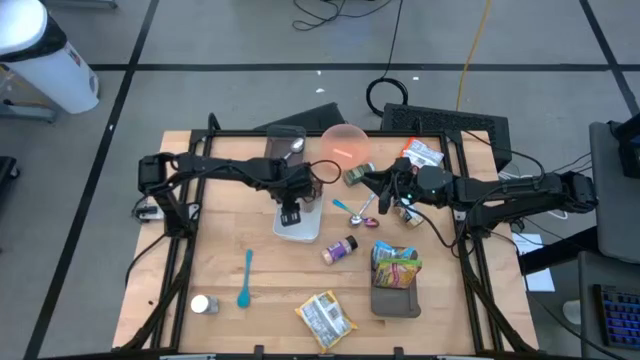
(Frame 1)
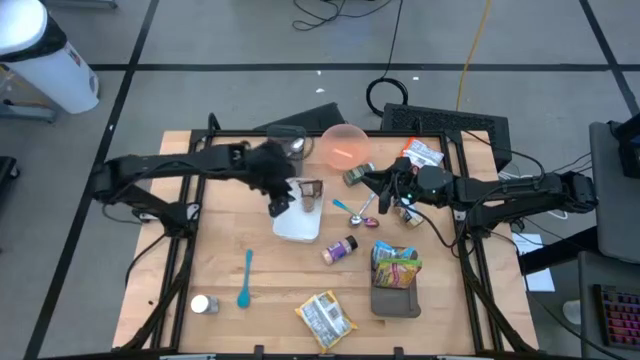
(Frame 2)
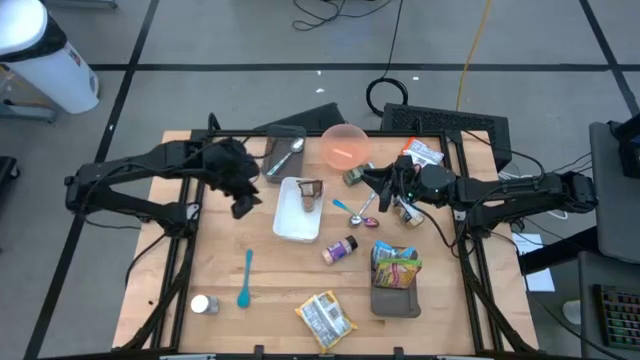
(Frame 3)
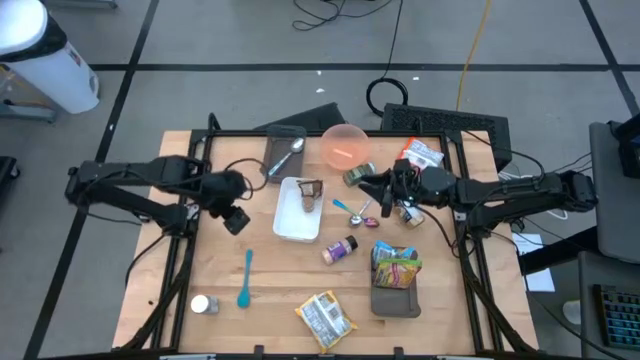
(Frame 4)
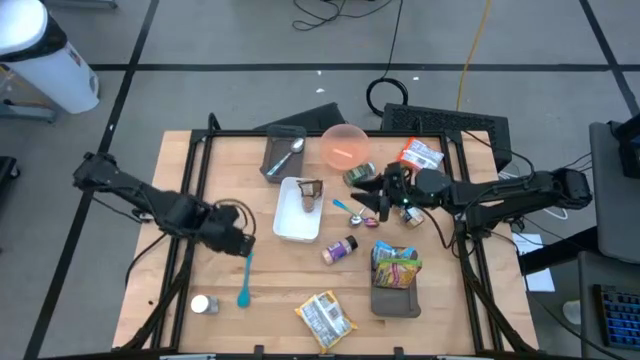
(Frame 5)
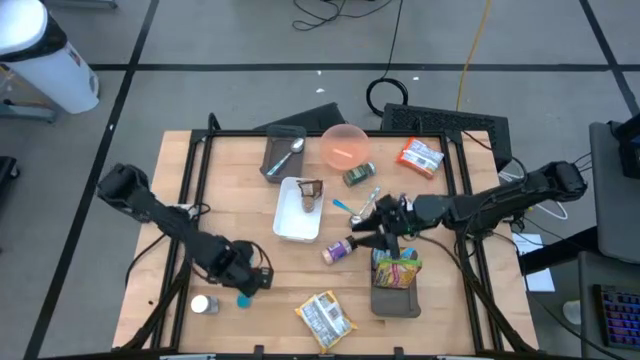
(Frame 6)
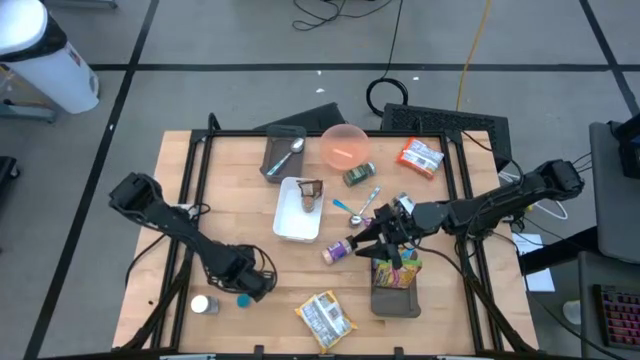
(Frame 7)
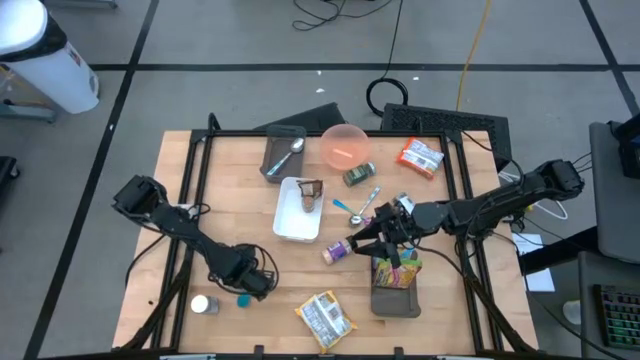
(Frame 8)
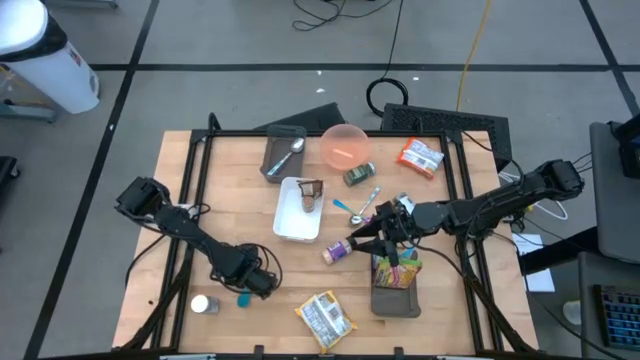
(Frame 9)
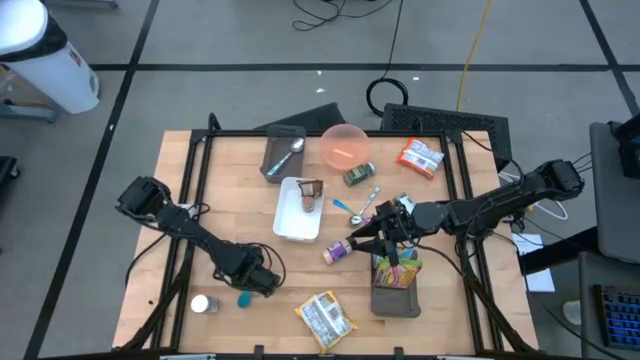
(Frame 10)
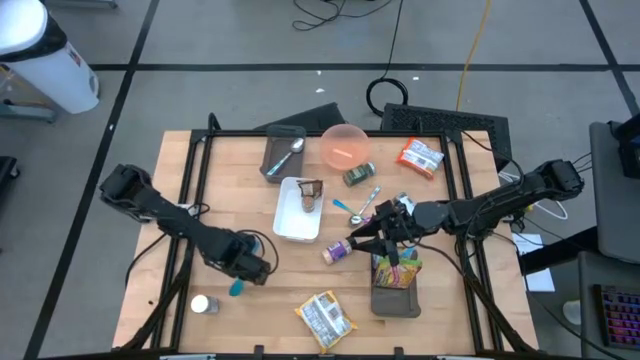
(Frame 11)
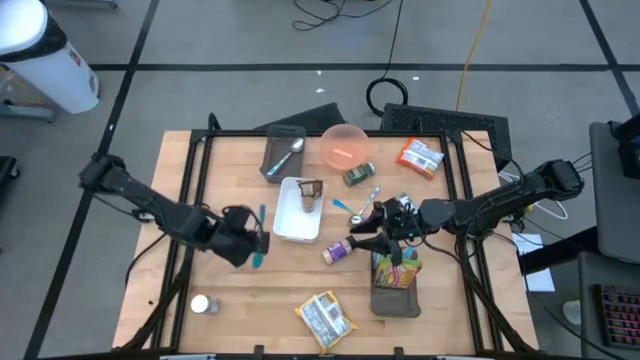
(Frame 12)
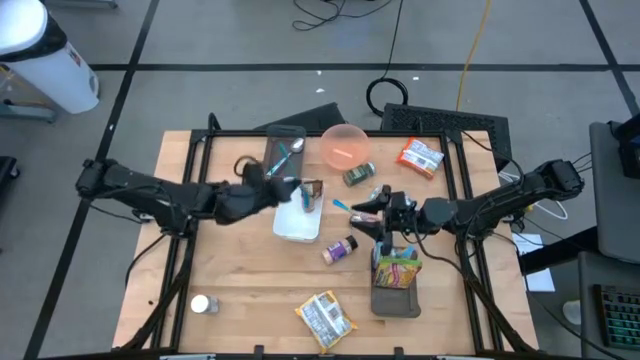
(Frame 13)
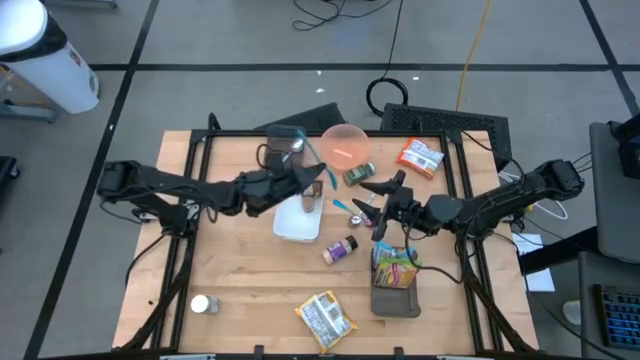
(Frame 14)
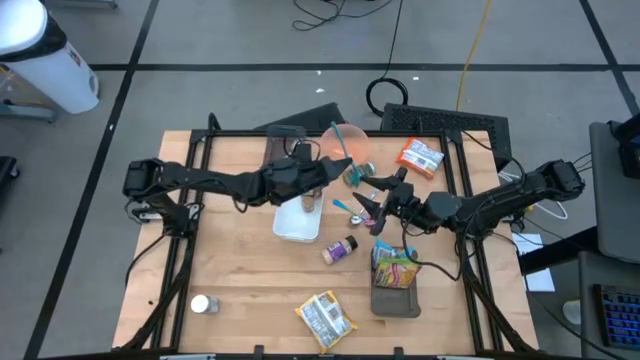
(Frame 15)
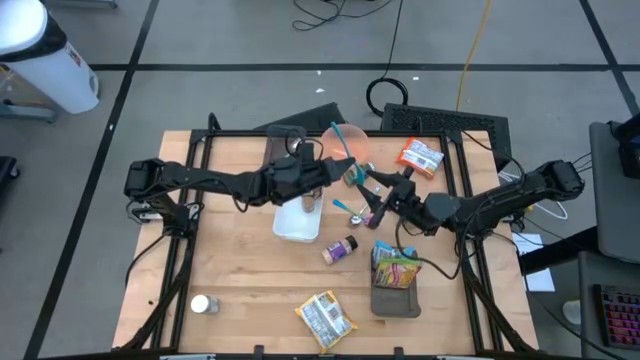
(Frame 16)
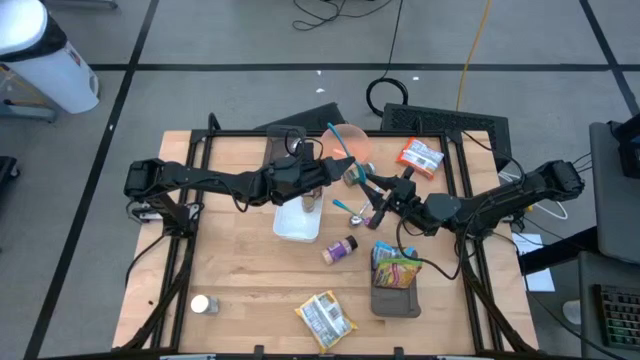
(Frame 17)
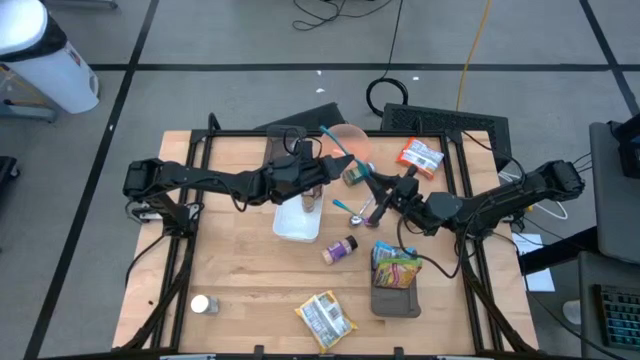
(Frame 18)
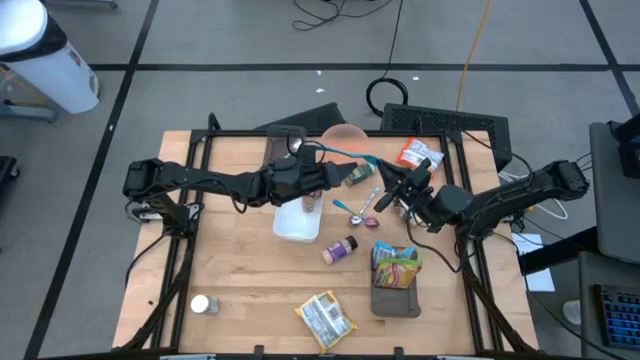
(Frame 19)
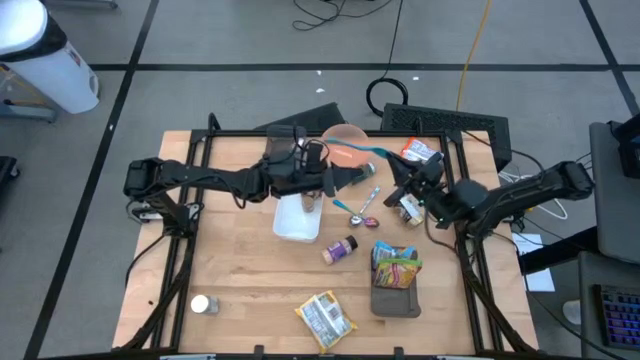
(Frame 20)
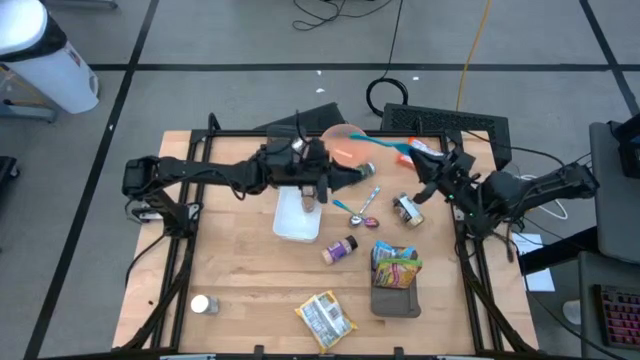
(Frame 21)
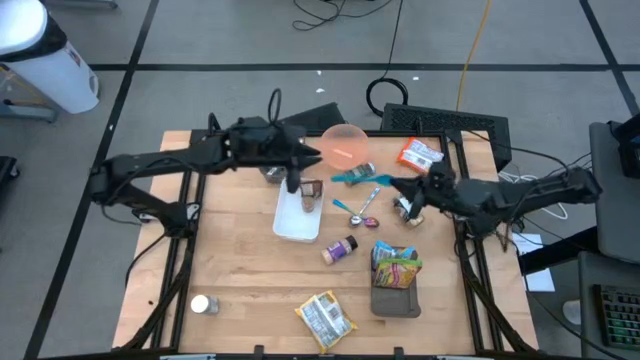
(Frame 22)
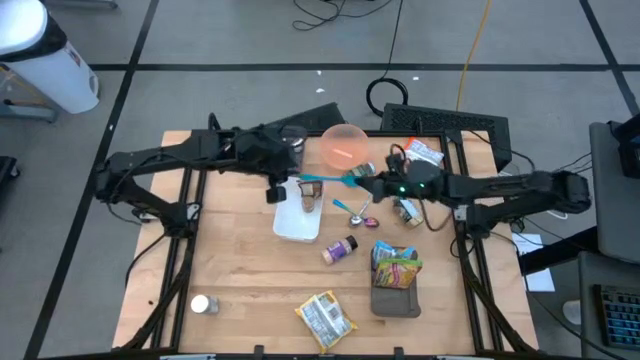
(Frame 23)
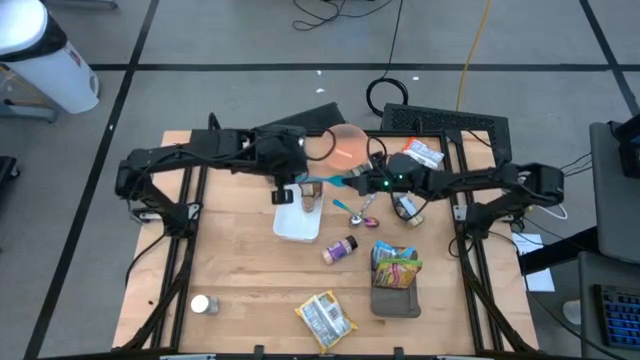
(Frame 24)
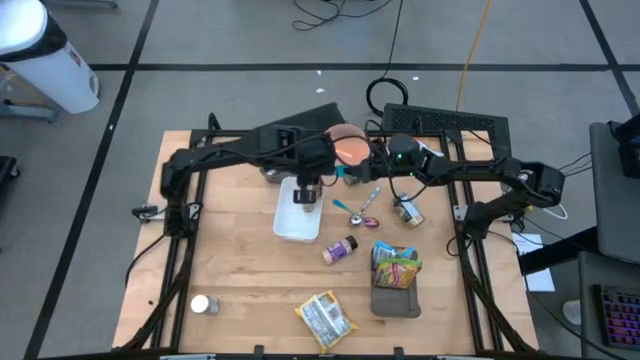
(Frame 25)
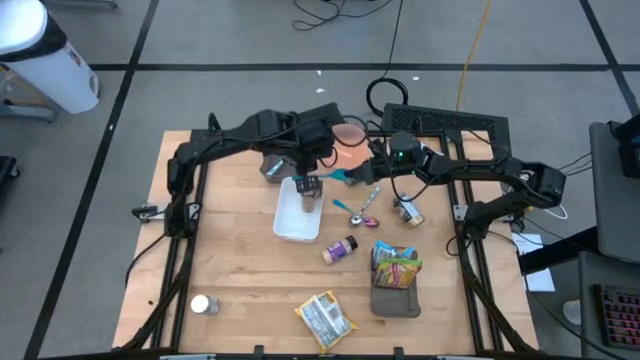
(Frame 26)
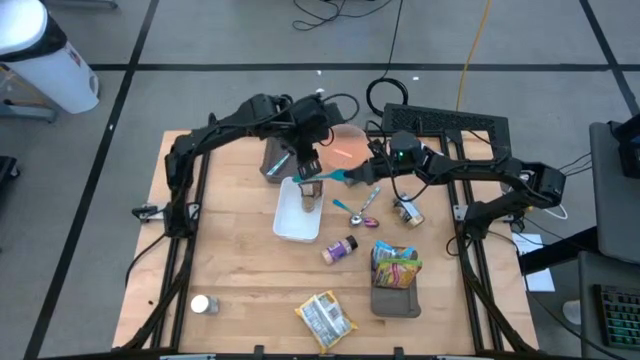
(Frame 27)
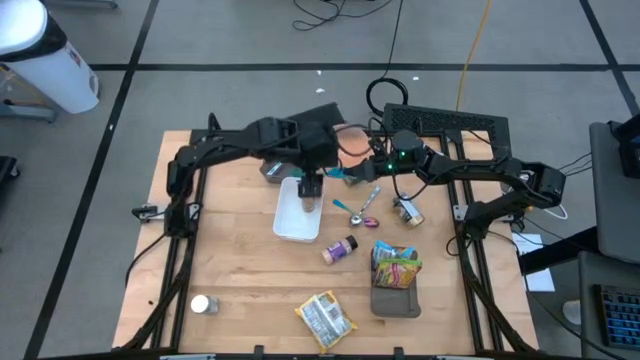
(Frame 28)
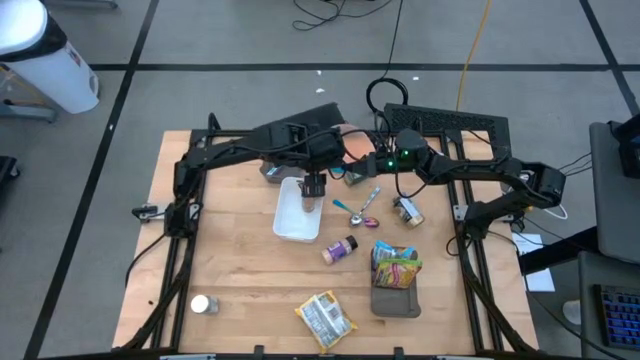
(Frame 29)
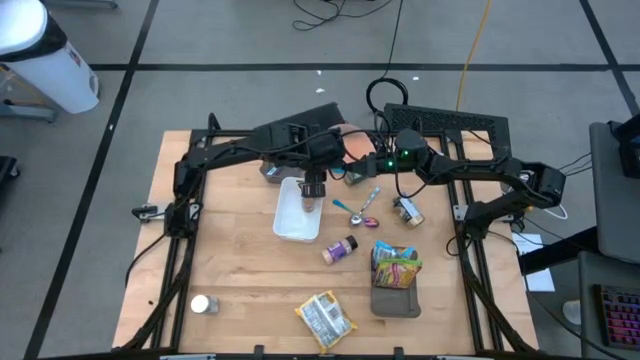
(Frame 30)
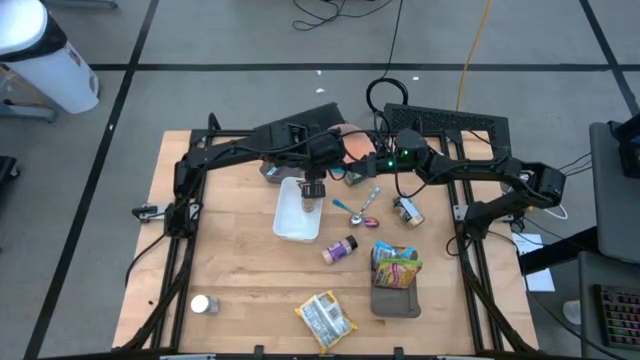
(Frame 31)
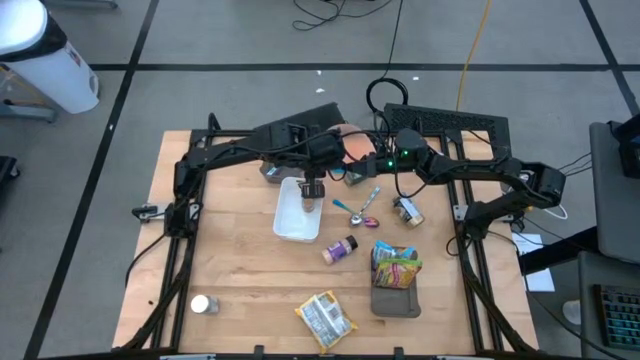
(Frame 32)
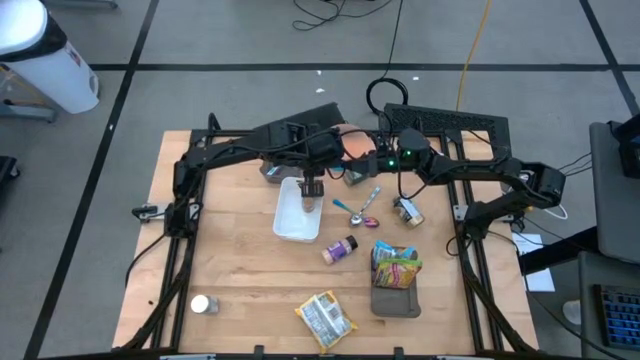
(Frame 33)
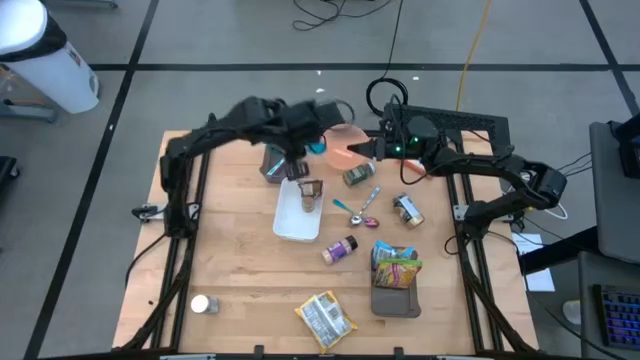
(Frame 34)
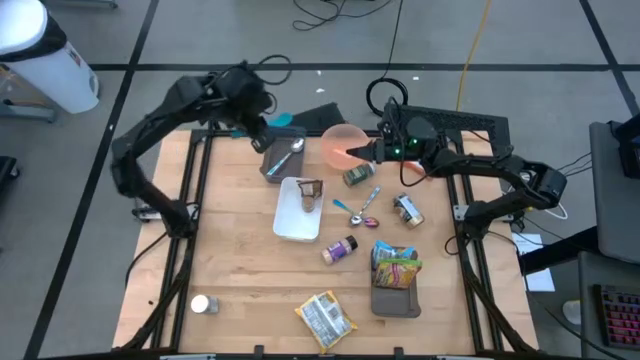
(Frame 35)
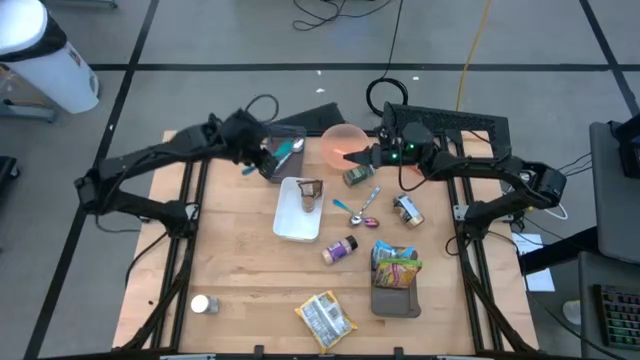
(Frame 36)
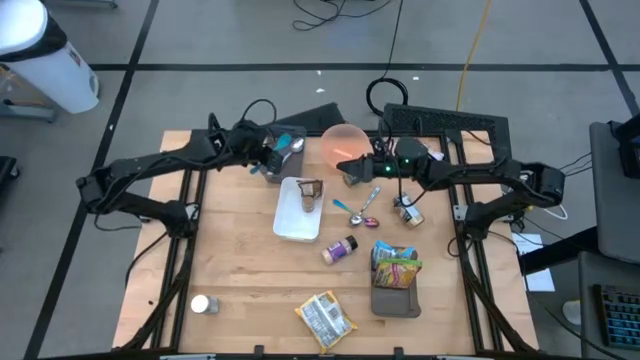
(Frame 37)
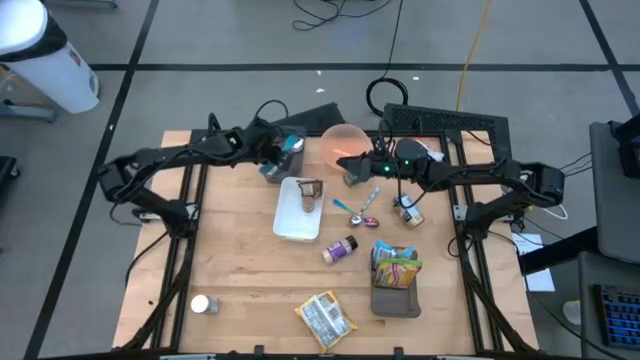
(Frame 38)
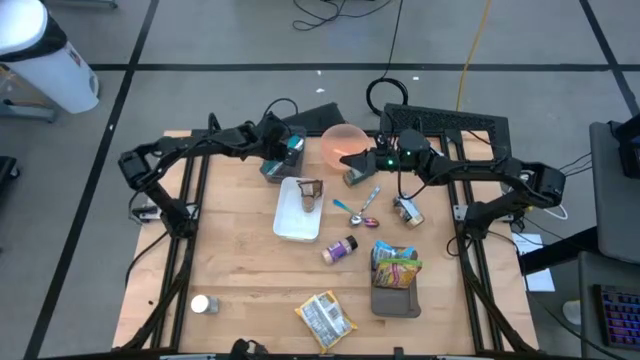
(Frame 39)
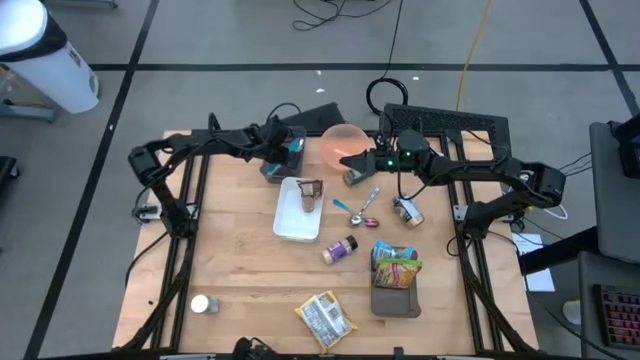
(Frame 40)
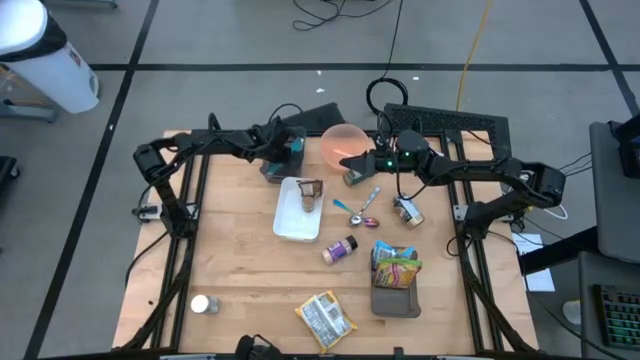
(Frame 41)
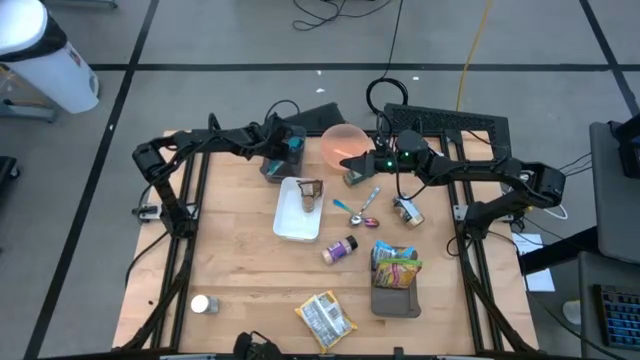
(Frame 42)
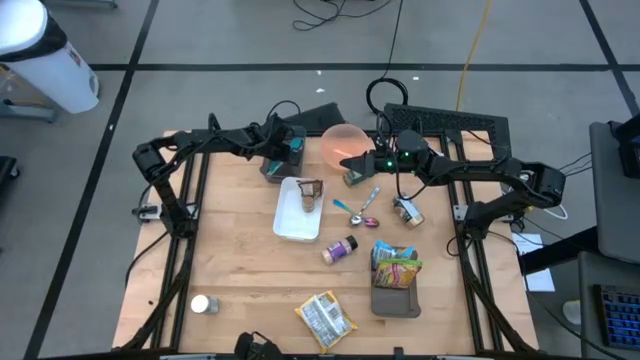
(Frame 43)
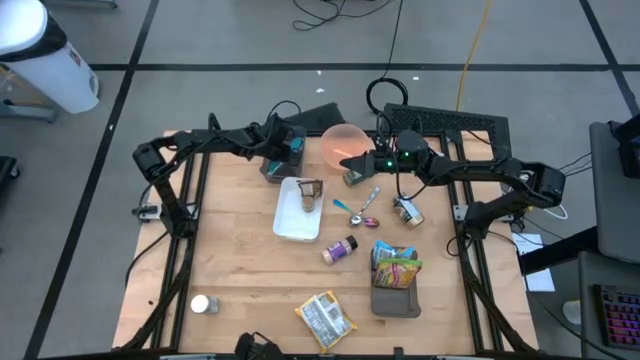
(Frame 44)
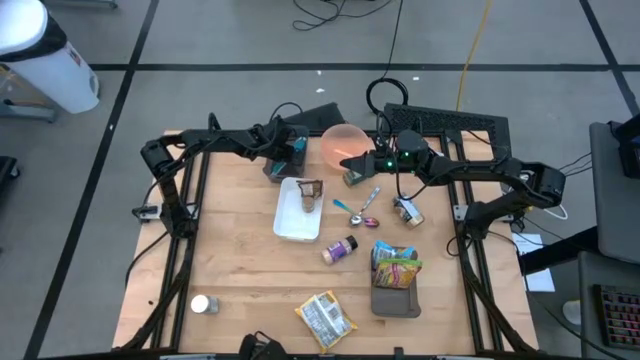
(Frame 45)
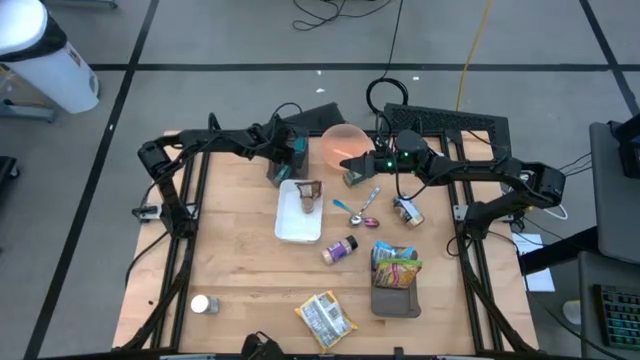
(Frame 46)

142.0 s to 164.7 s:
Task: Pick & Place Food Item
Put the blue baby spoon into the top black transparent bin
